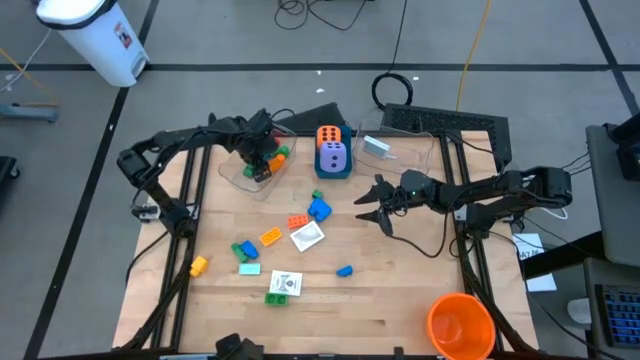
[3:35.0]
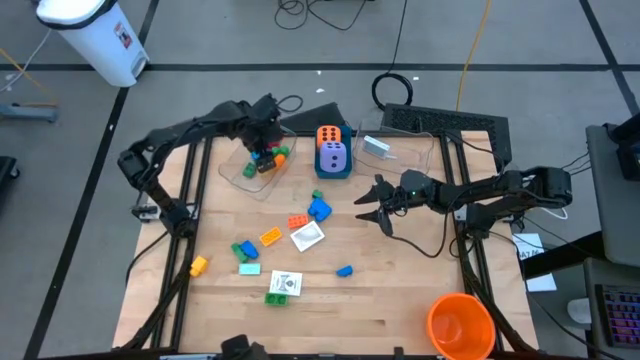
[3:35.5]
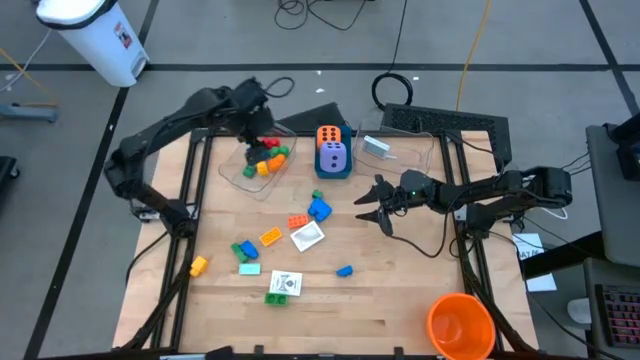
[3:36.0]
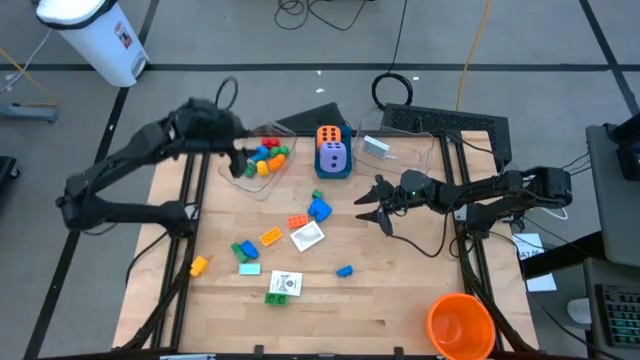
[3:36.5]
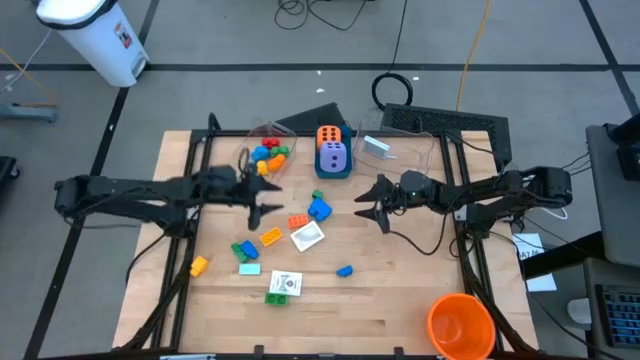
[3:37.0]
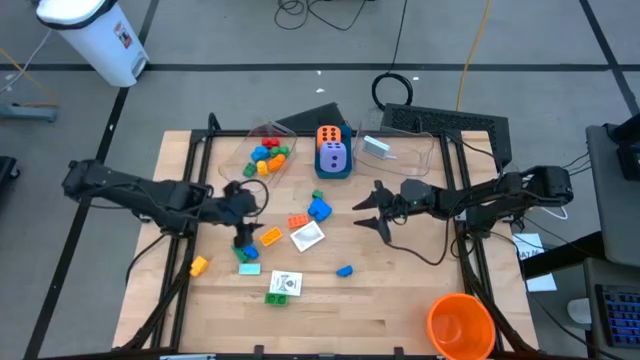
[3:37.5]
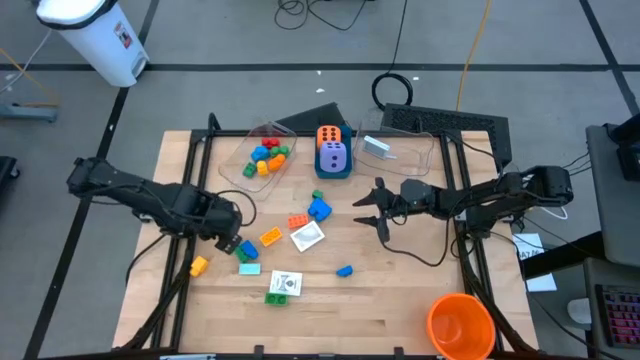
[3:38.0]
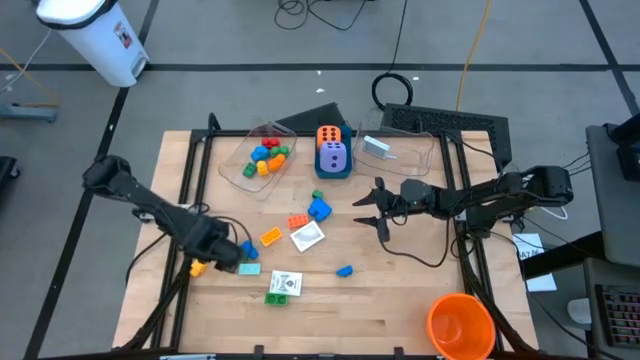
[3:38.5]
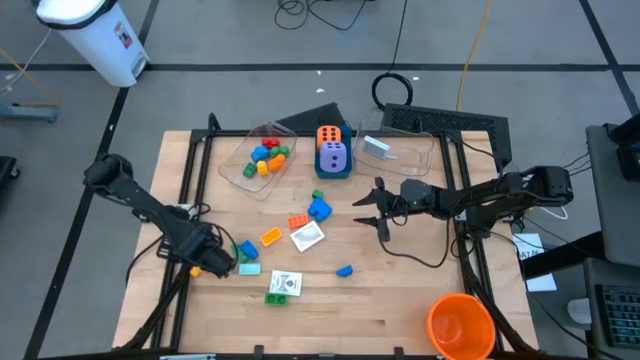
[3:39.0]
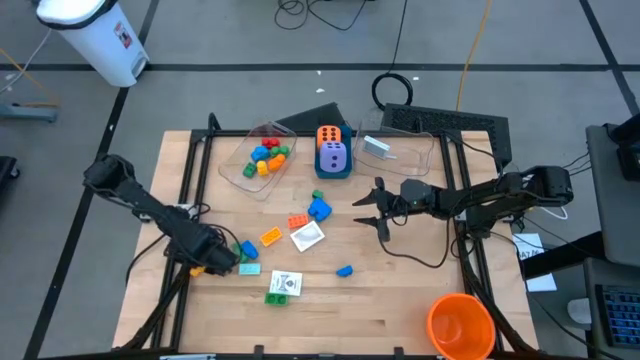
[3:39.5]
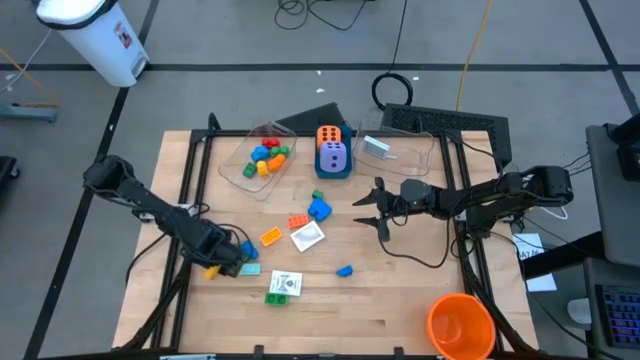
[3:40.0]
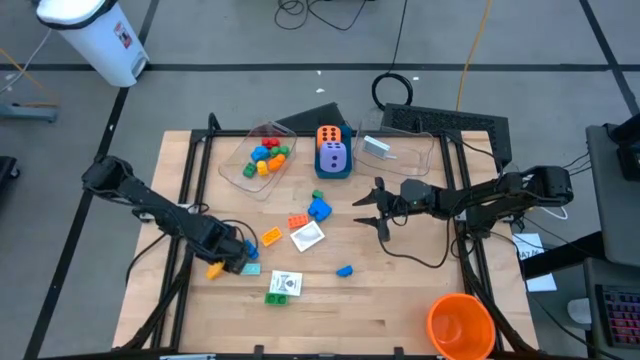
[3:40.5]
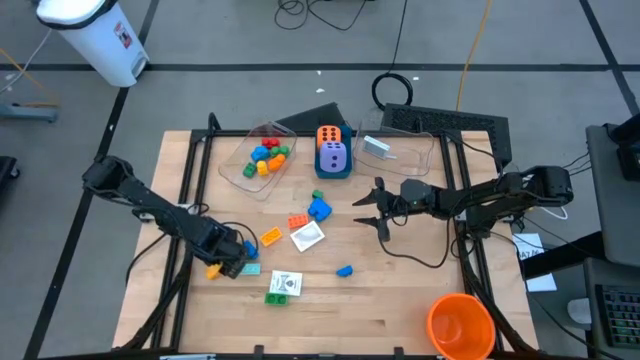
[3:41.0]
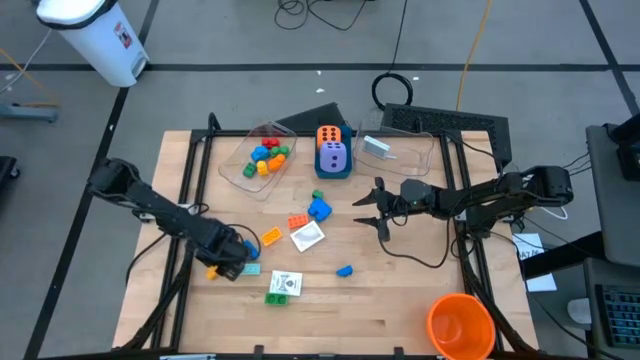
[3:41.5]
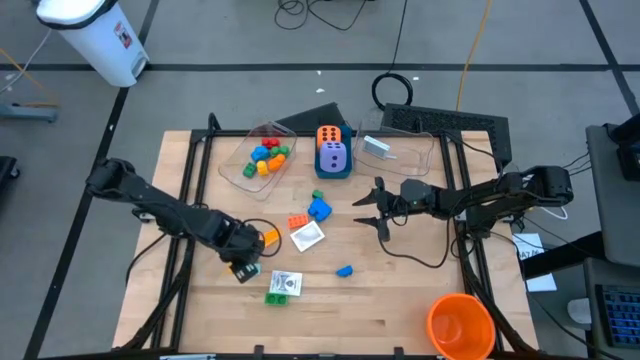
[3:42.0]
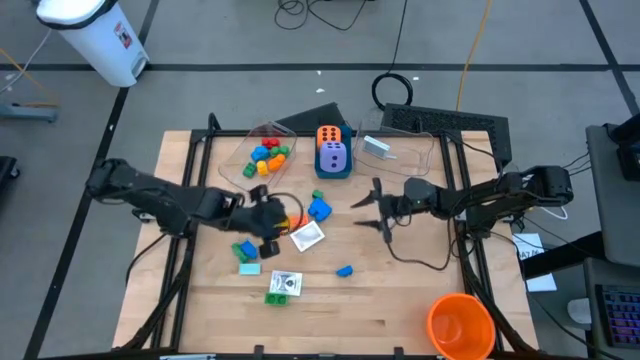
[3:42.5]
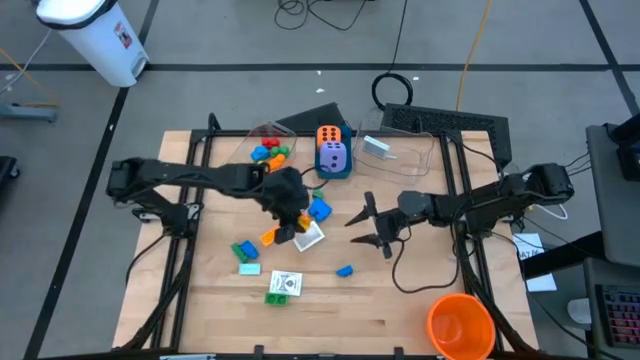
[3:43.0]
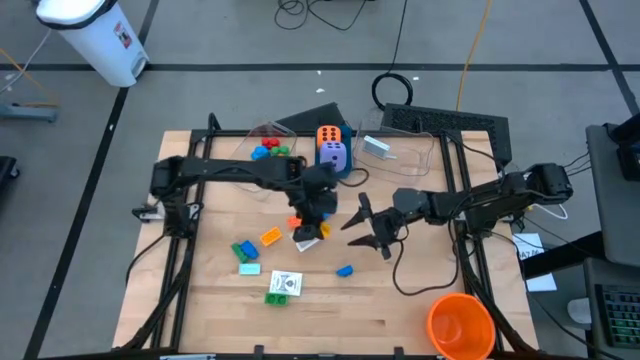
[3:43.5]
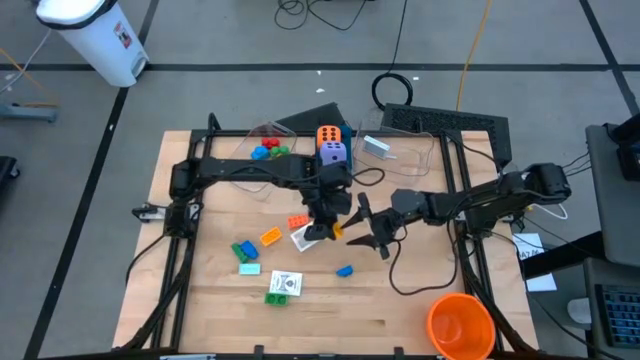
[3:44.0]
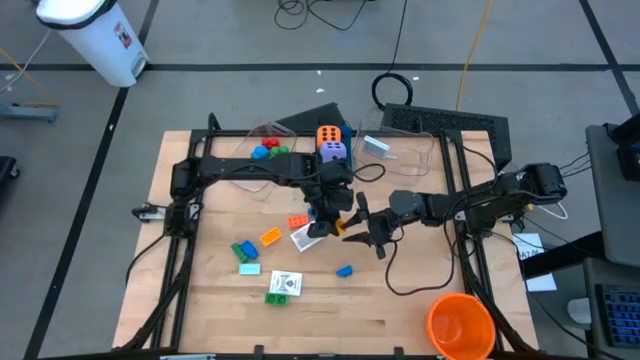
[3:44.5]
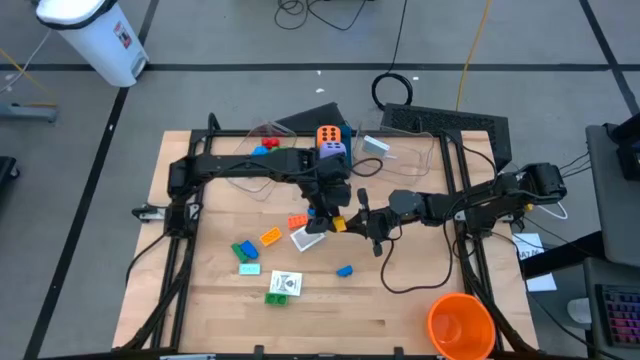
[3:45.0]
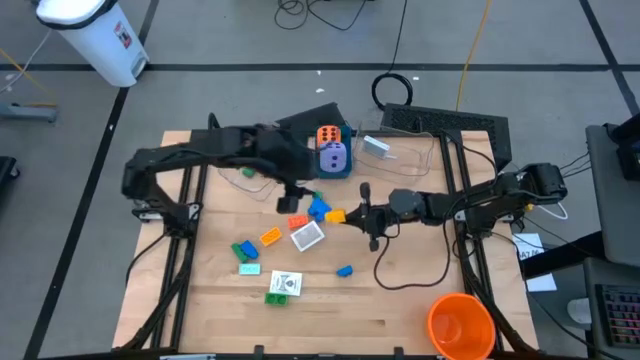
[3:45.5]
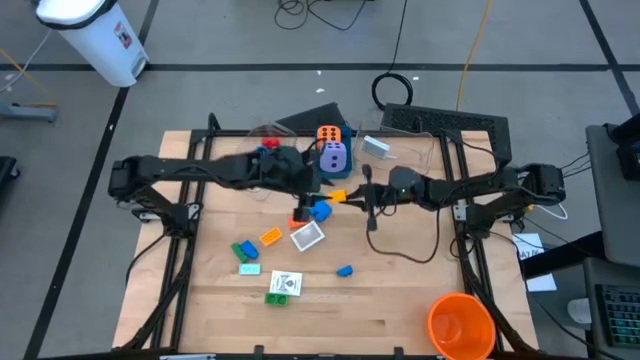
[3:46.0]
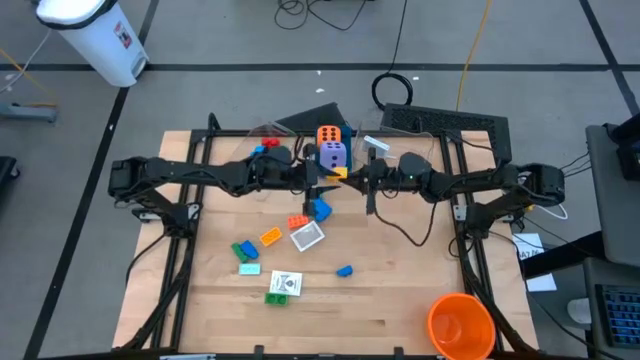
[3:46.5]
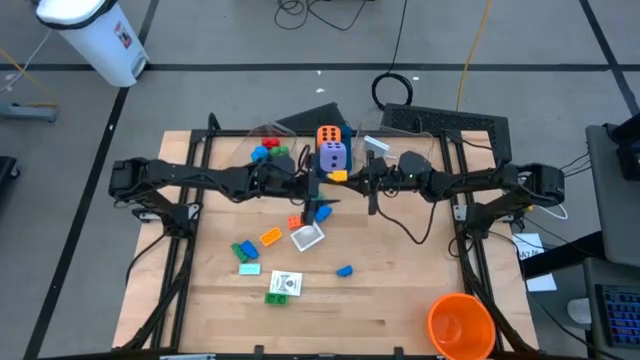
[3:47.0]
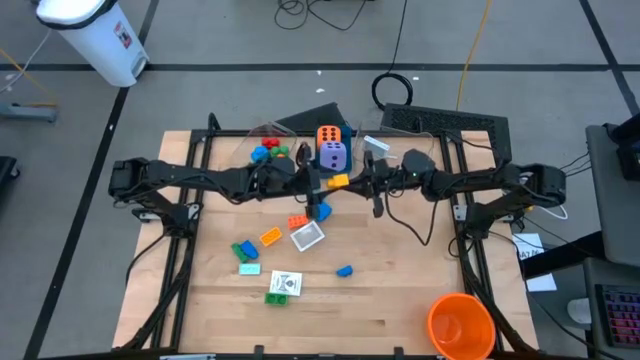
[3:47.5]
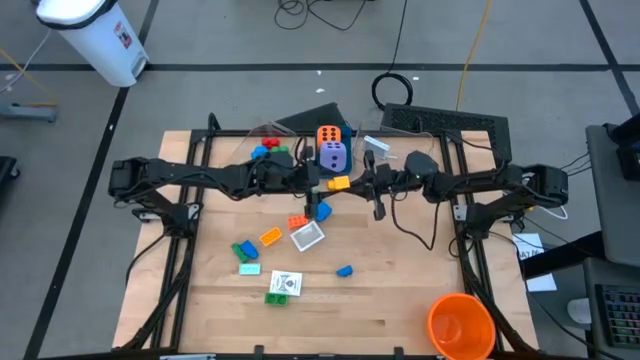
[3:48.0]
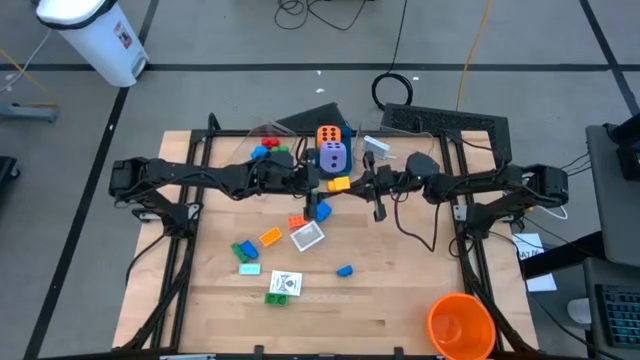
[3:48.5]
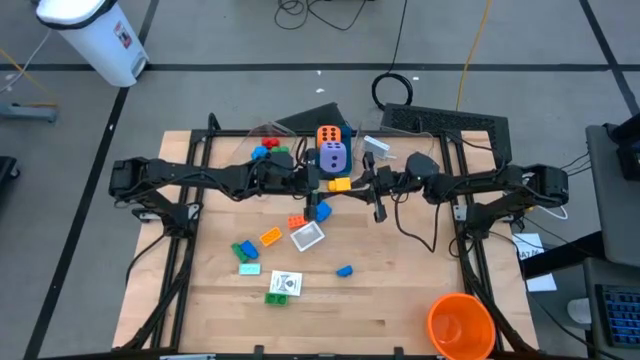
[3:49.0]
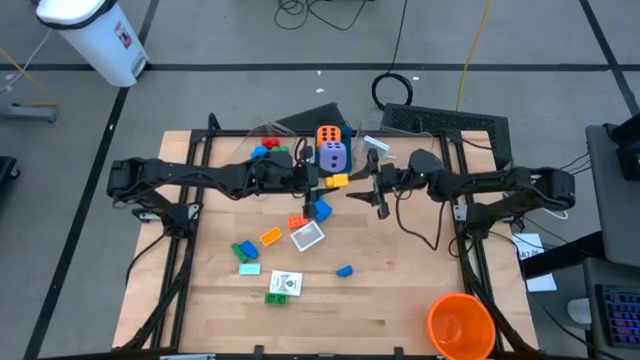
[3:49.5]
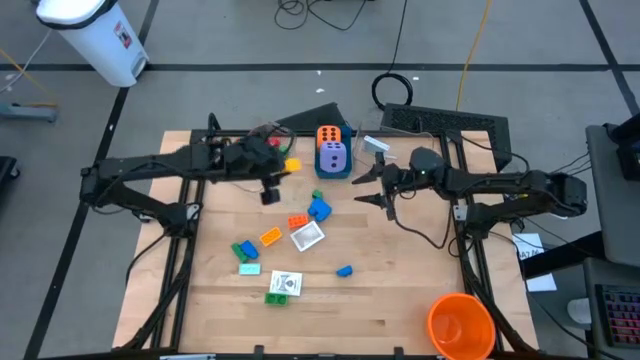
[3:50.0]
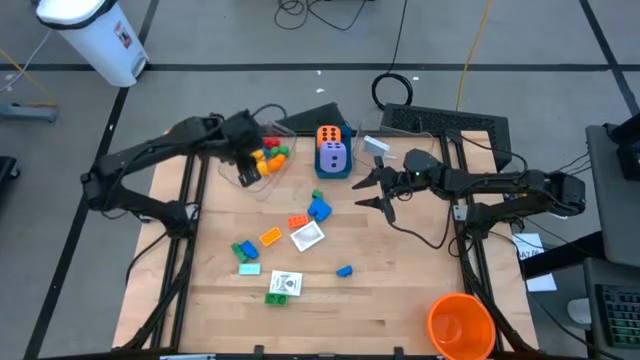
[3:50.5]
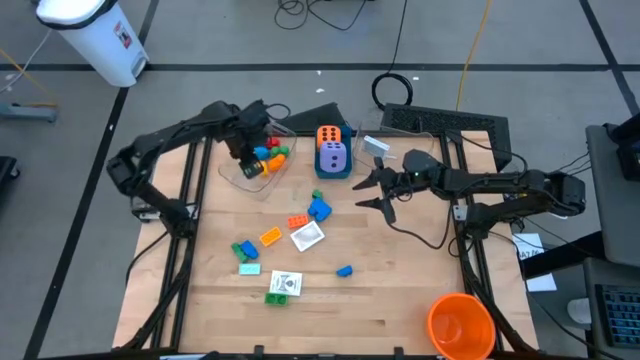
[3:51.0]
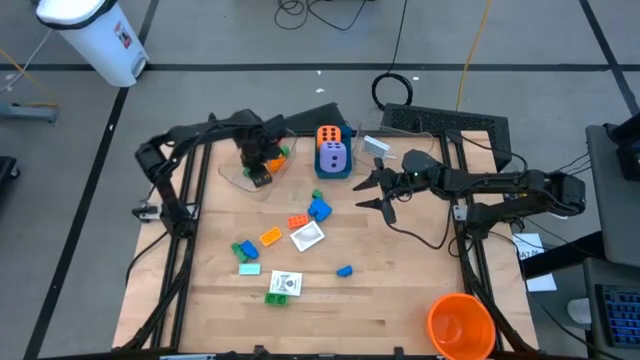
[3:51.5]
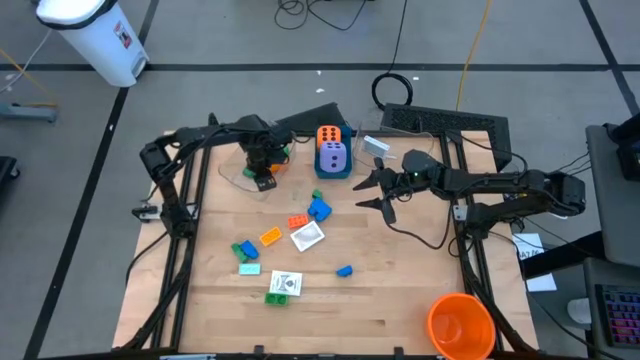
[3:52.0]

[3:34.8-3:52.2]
Task: Pick & Place Toys
Put the yellow game piece into the left transparent bin

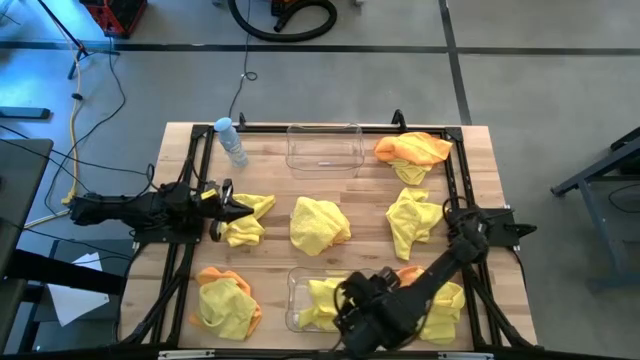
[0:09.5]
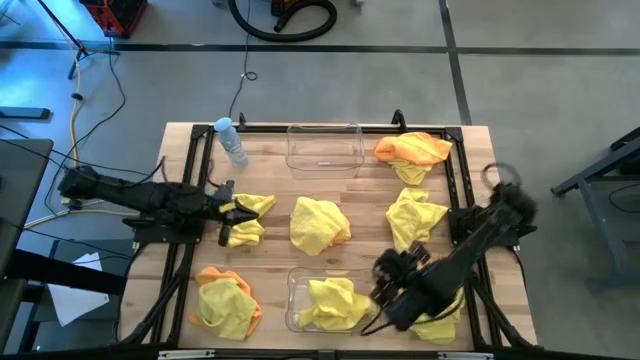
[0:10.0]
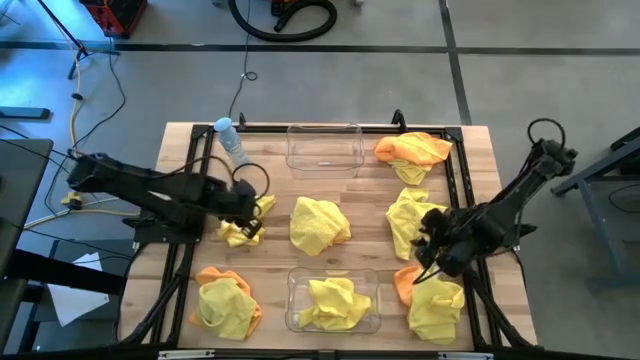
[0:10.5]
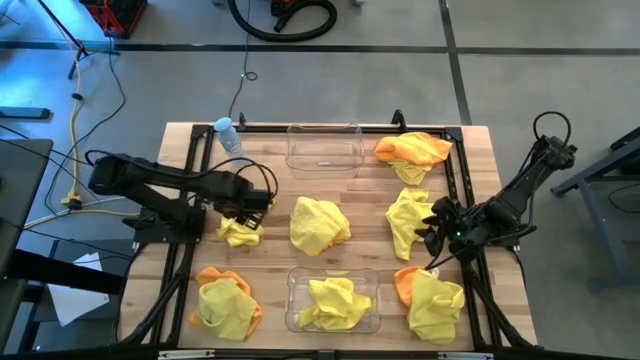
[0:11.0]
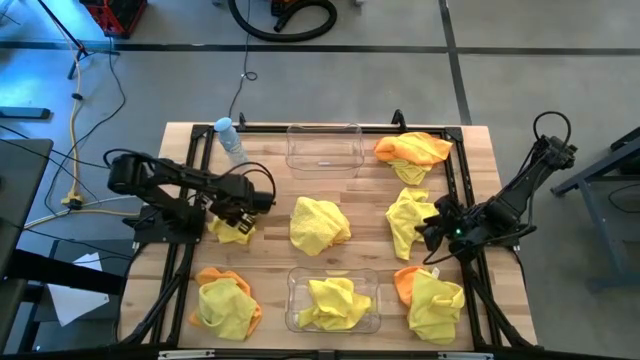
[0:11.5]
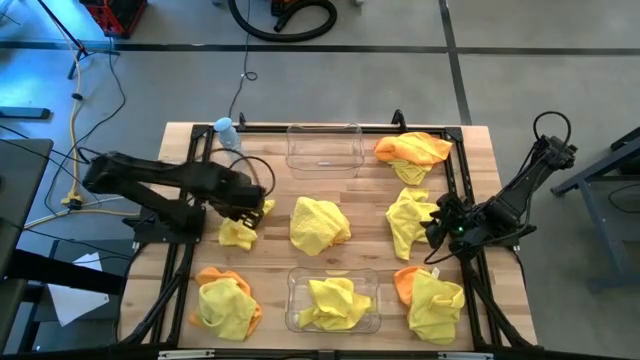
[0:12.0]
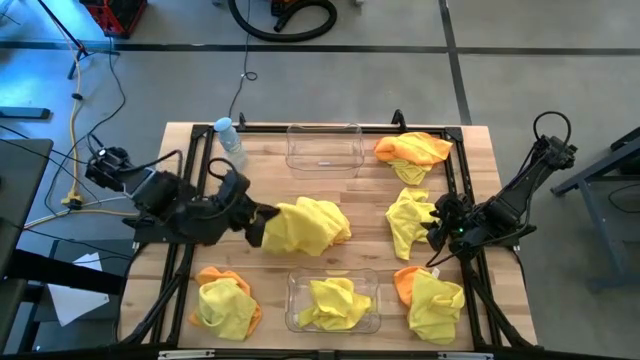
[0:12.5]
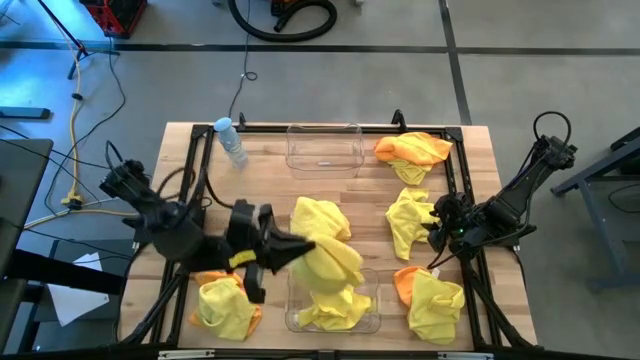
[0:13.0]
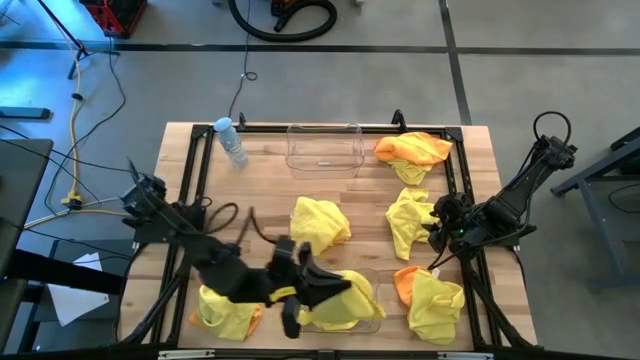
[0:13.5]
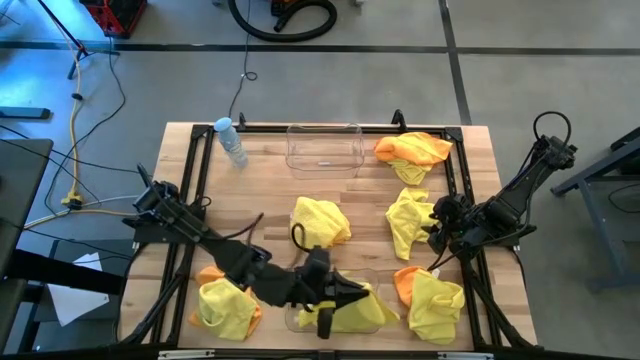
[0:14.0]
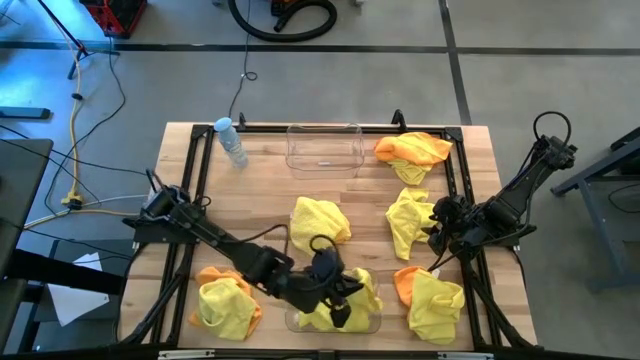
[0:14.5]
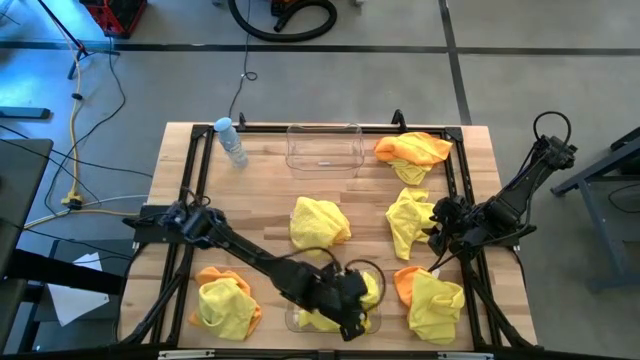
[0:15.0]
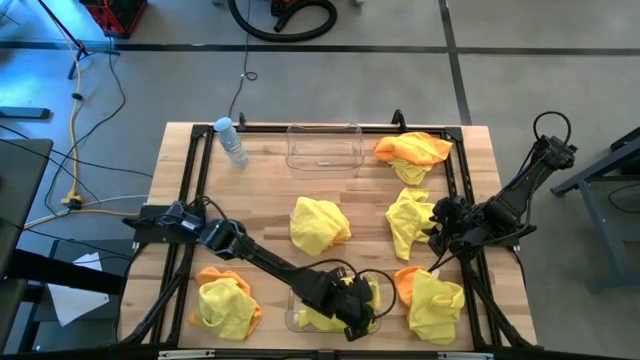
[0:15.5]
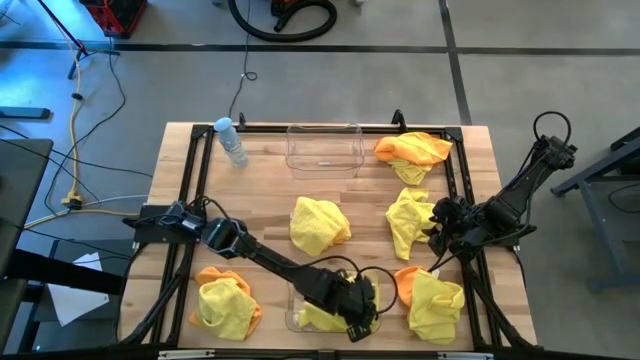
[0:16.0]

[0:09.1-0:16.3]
Task: Sort microfiber towel by color & place in baskets
Put the yellow microfiber towel into the bottom transparent bin
